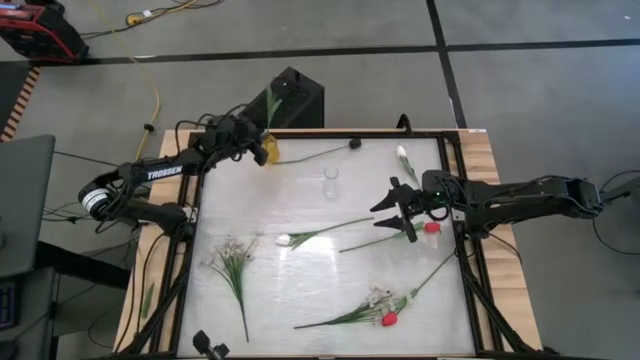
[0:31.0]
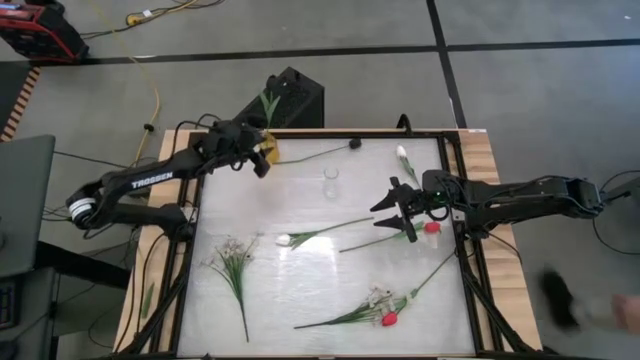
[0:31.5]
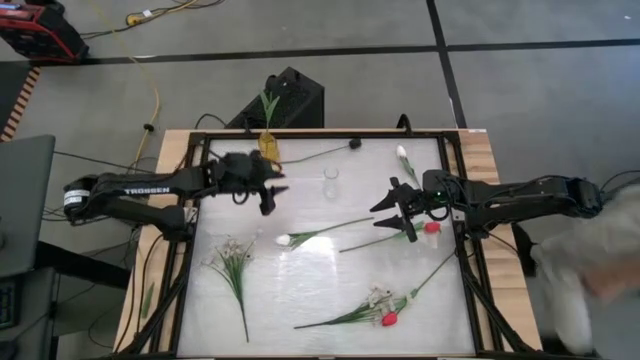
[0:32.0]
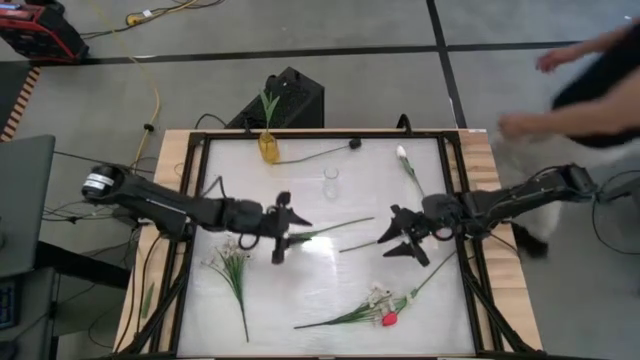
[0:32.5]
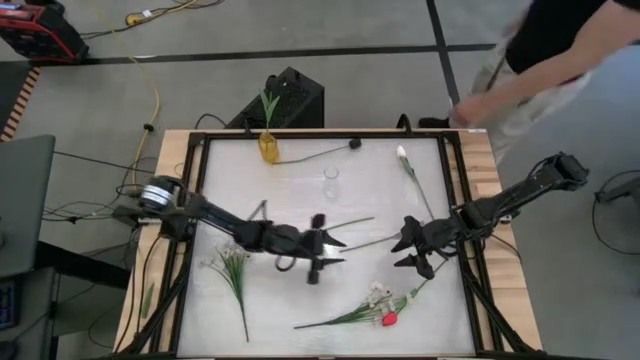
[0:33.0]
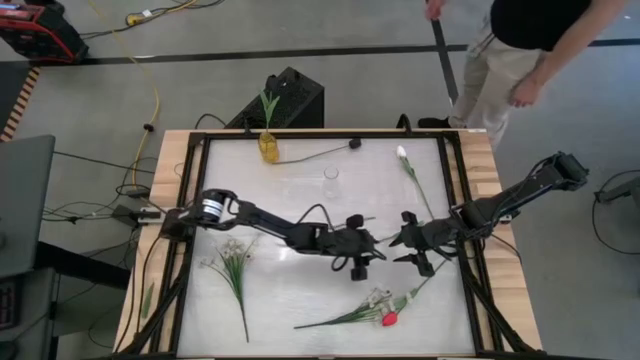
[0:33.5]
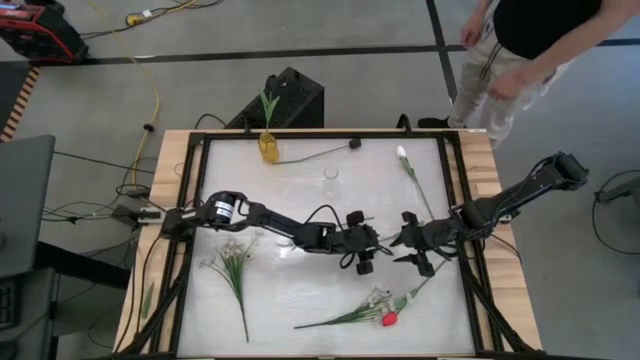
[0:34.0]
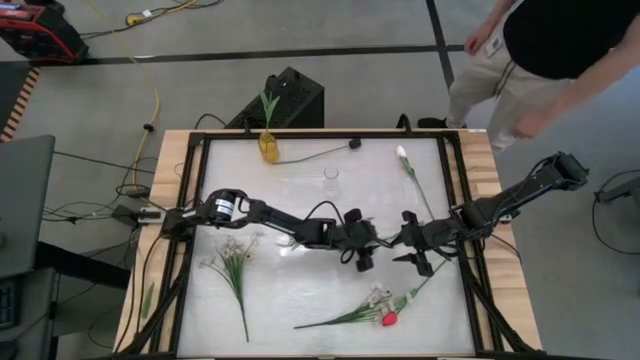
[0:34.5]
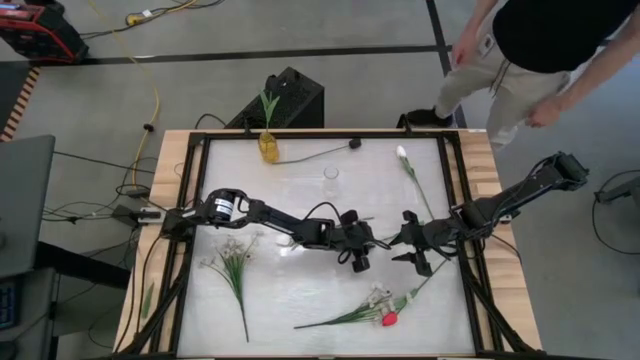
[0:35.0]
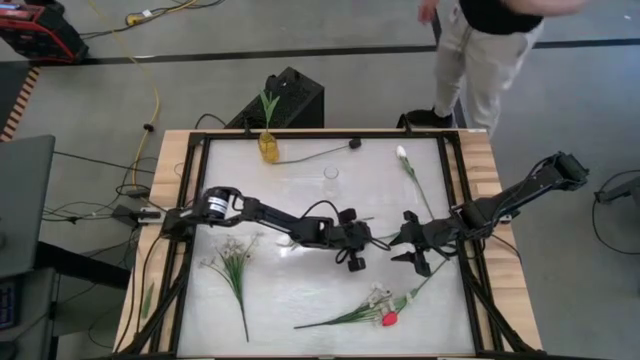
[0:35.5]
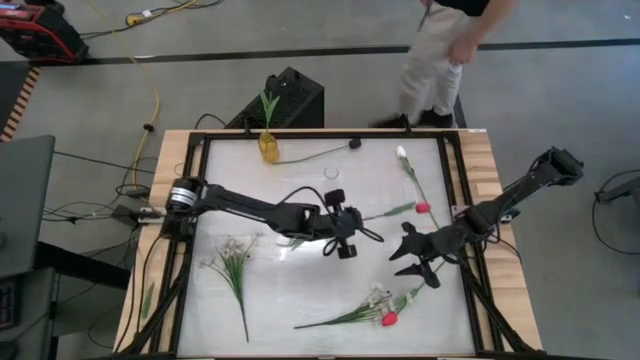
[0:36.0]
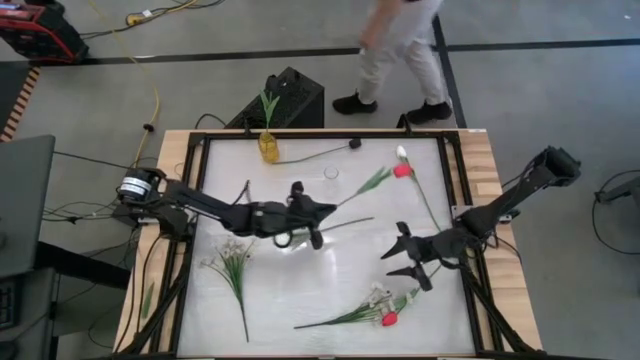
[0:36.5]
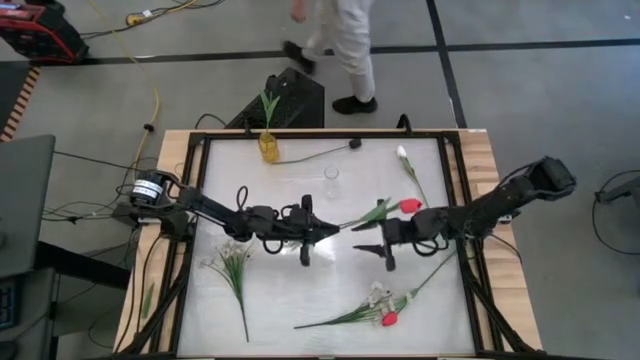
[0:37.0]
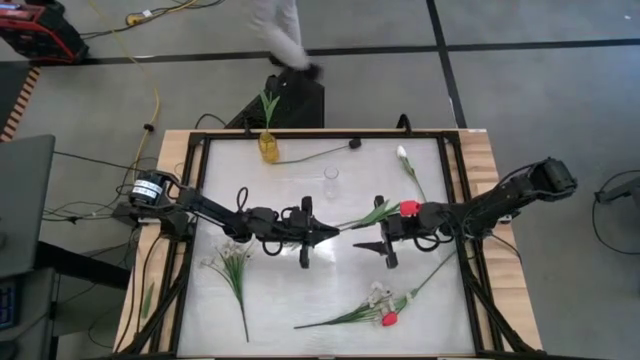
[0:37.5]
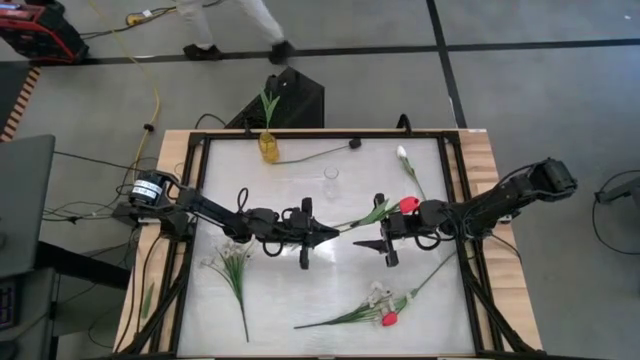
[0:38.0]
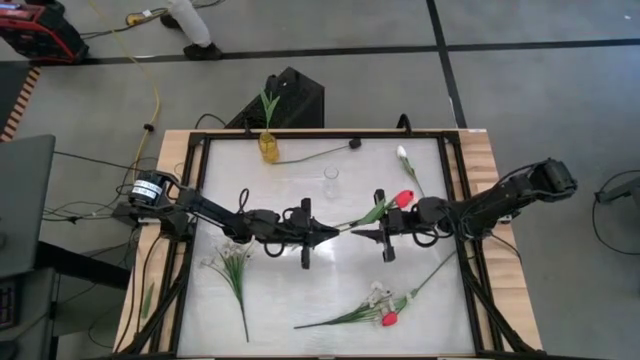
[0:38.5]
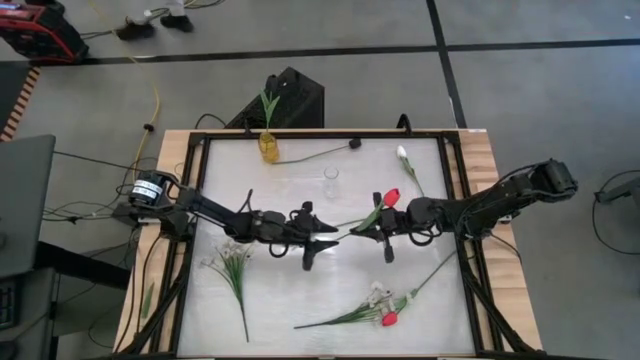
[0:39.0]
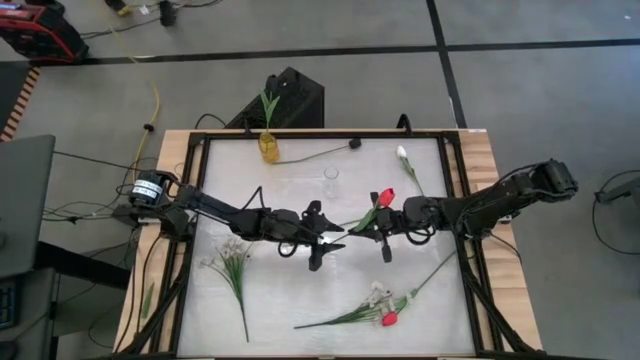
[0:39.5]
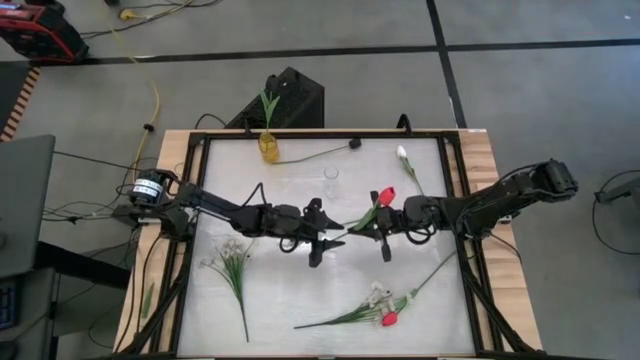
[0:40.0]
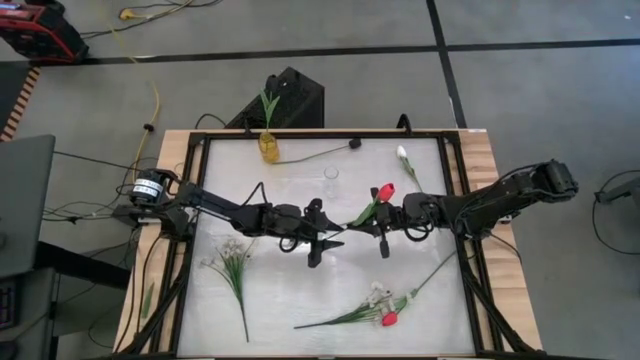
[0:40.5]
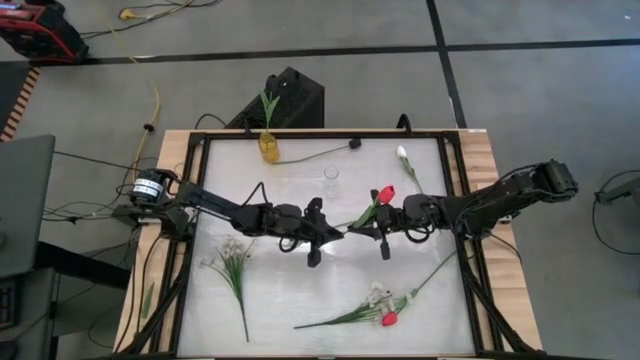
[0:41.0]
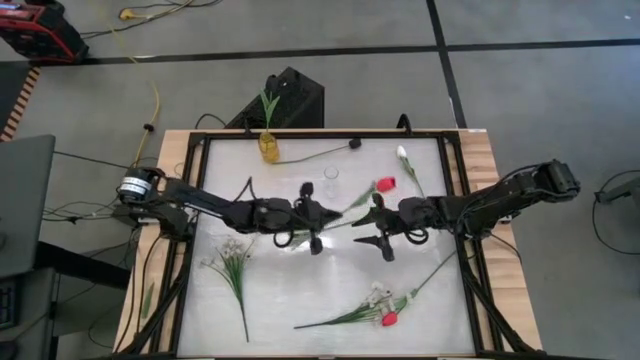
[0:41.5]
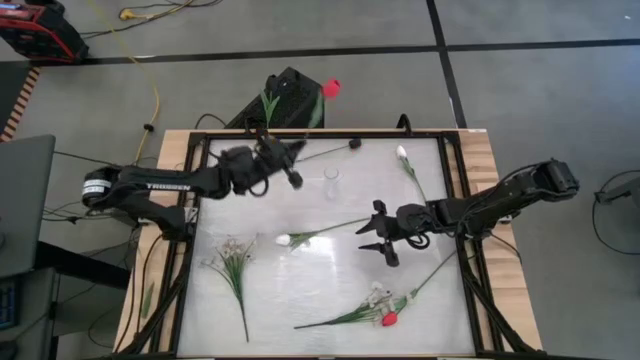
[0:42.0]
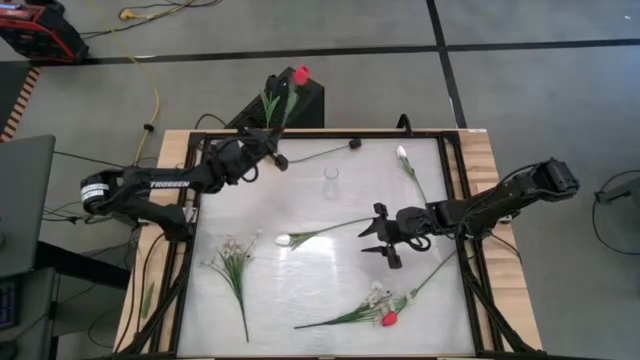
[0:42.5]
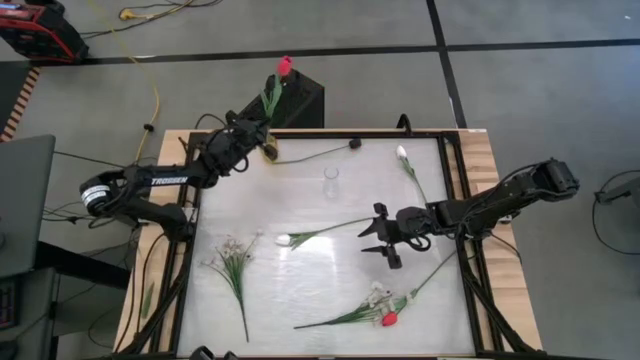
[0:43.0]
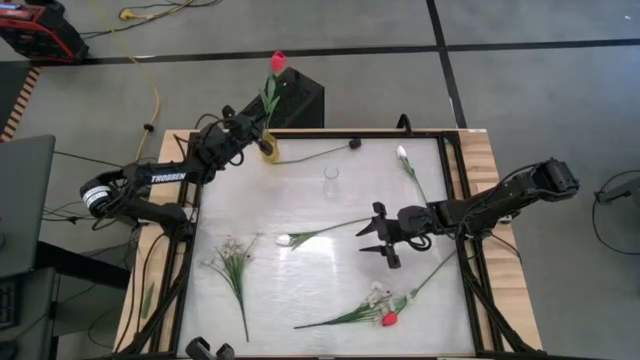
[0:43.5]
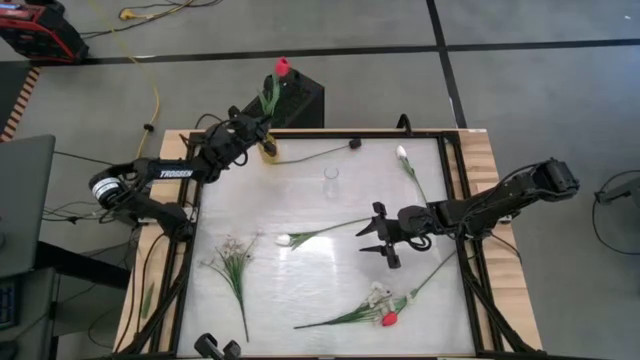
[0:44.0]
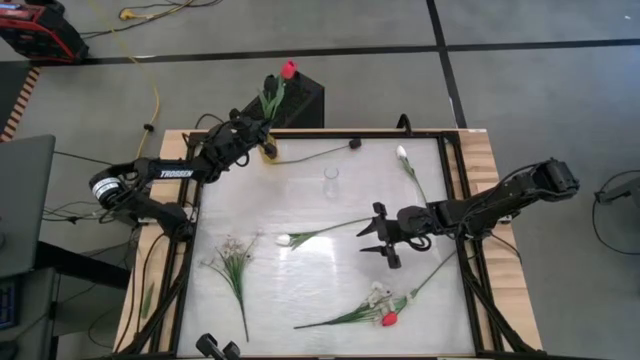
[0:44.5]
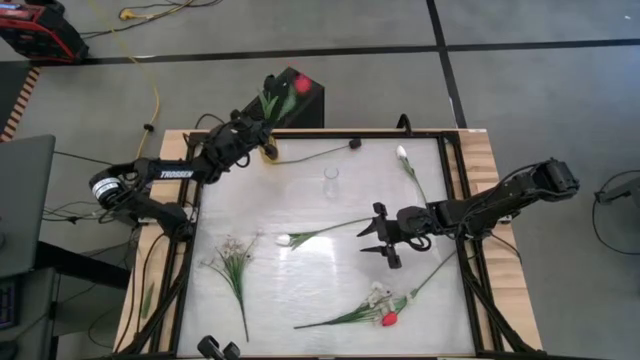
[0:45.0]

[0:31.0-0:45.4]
Task: Sort flowers into vase by color
Put the top red flower into the yellow flower vase

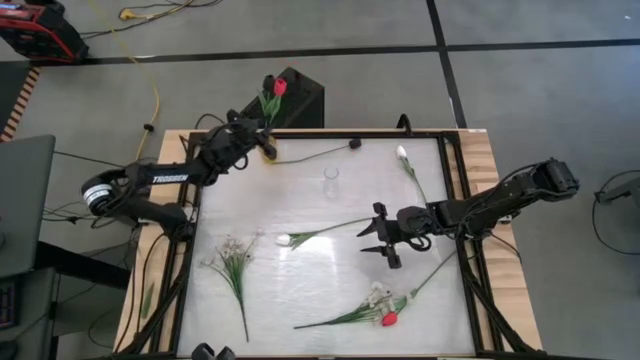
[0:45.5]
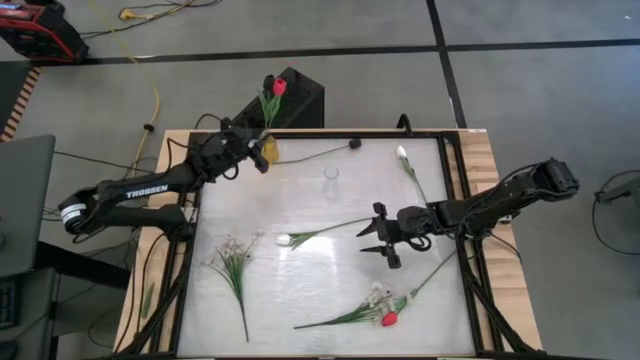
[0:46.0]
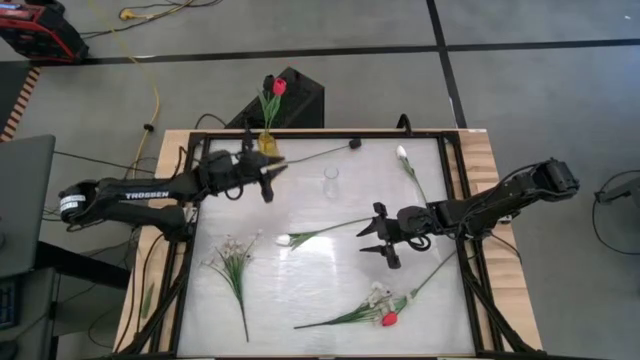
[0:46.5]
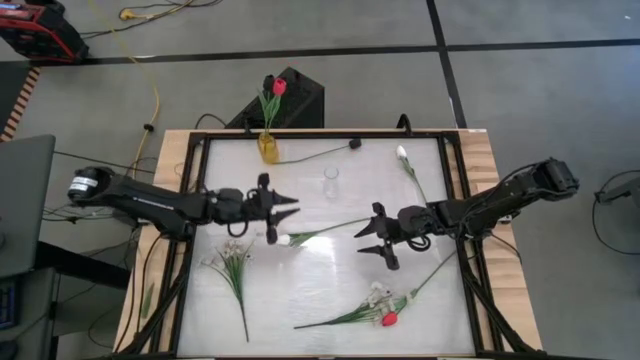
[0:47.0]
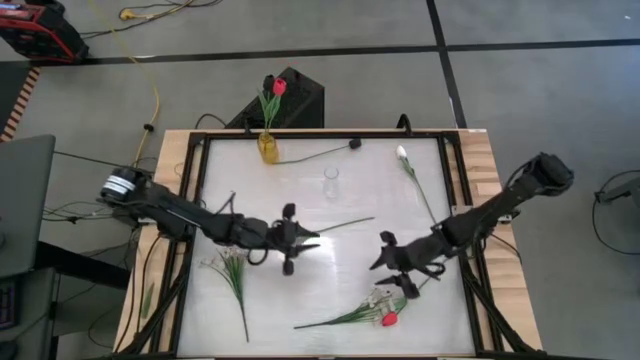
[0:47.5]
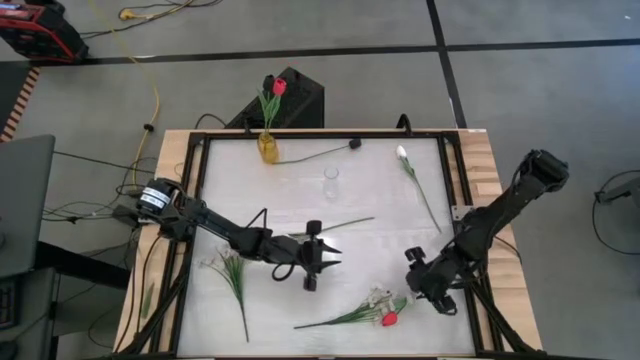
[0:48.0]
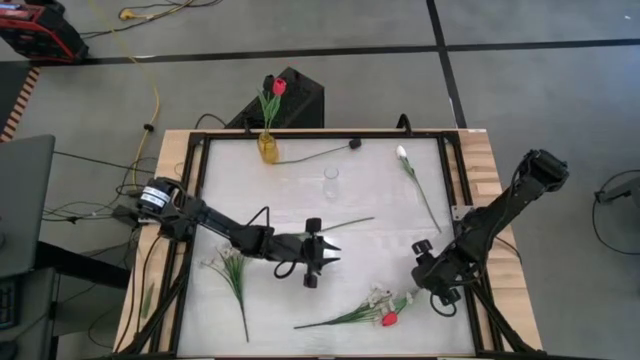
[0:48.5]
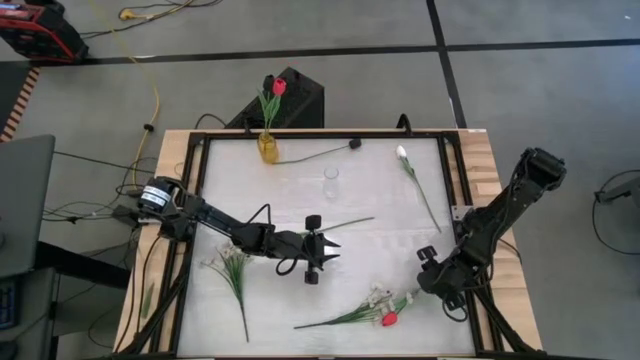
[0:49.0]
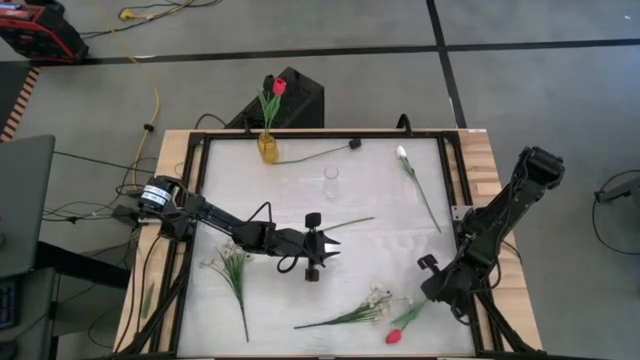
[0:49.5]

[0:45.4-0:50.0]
Put the red flower into the yellow flower vase

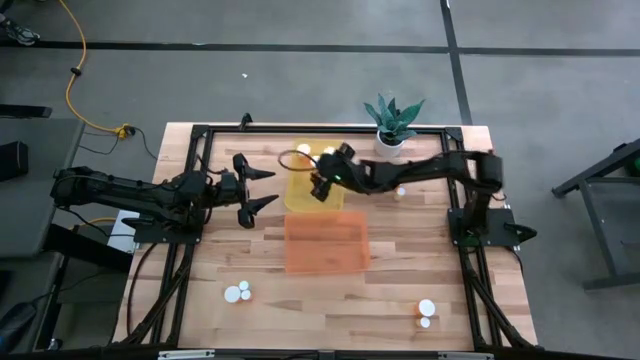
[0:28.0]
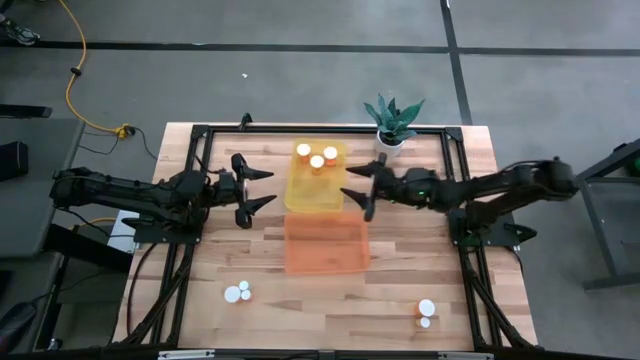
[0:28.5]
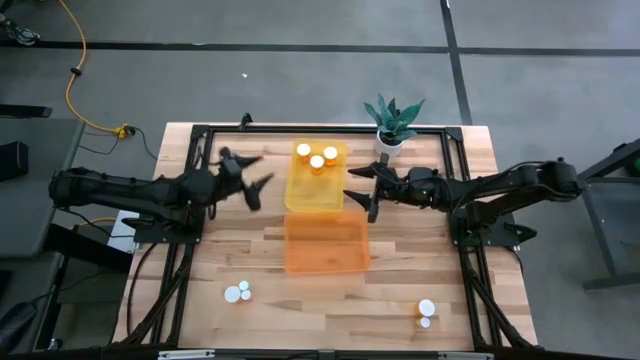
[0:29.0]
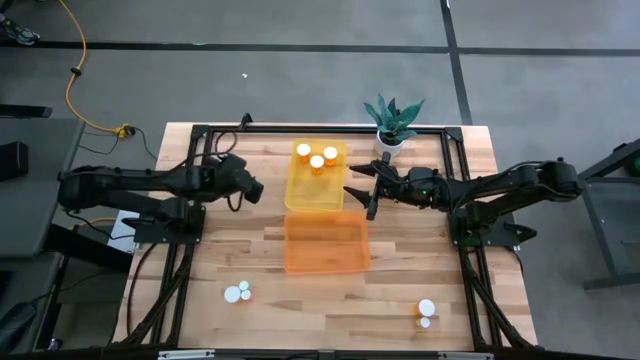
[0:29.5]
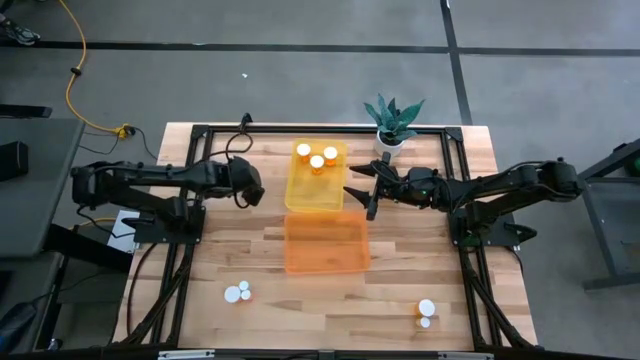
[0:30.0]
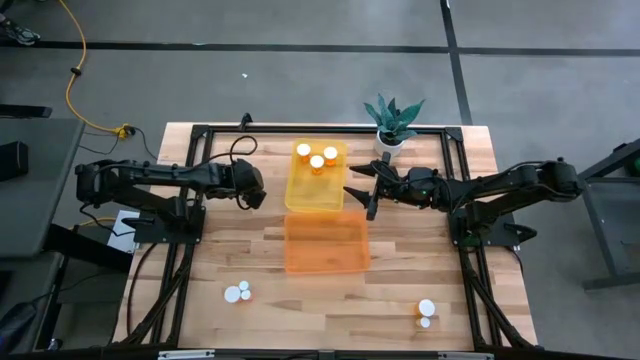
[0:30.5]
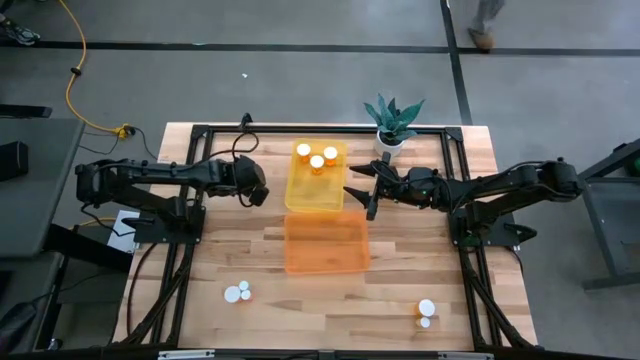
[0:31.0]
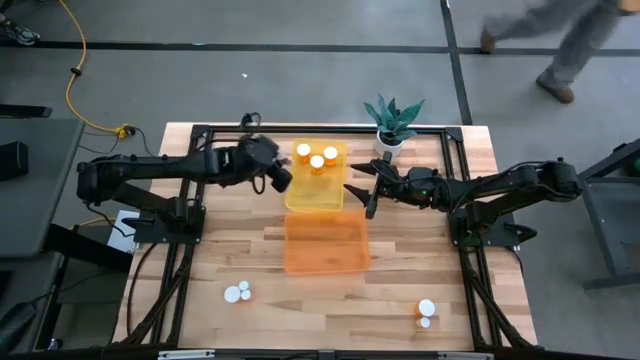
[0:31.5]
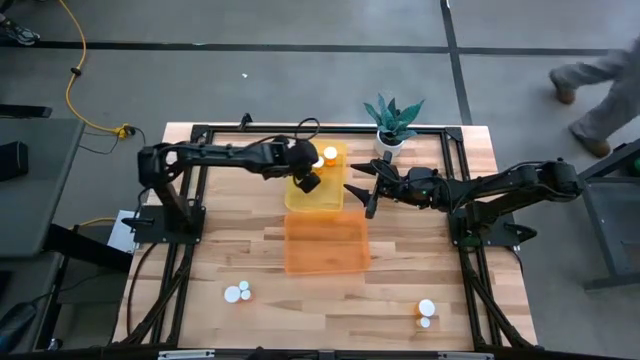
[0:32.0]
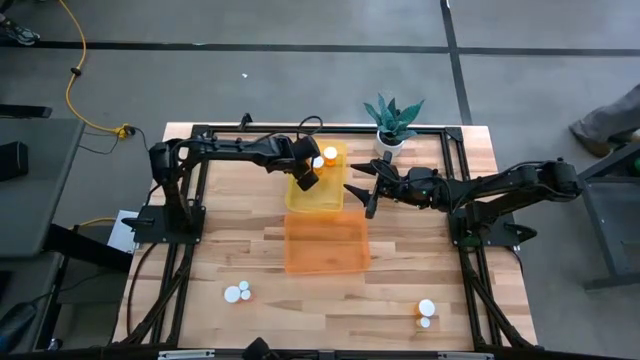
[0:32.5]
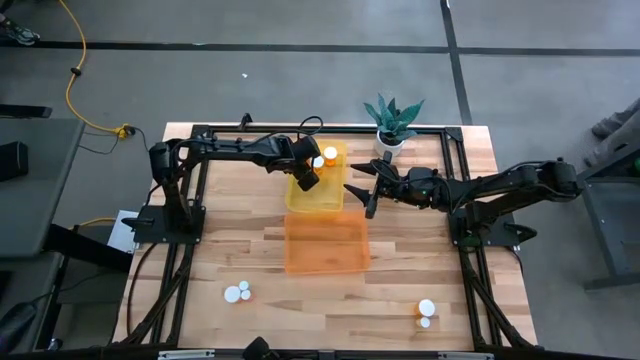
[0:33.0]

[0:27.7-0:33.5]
Task: Pick and place medicine bottles into bin by pill shape (circle, oval)
Put the blue capsule bottle into the yellow bin
